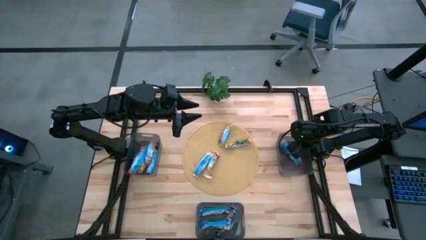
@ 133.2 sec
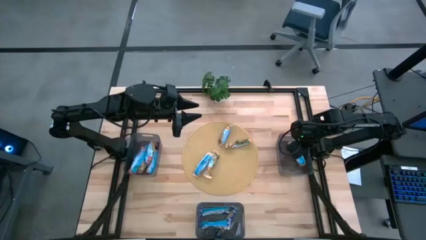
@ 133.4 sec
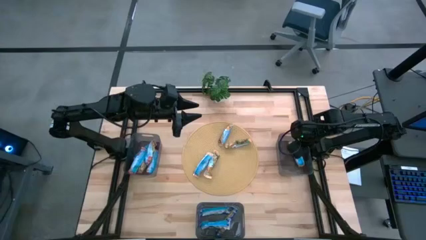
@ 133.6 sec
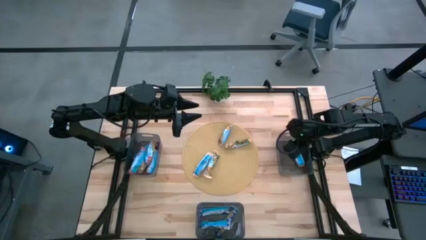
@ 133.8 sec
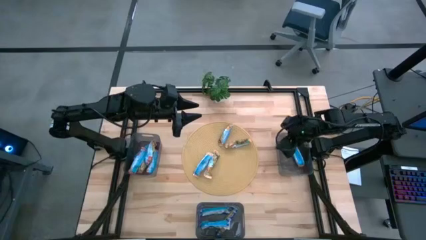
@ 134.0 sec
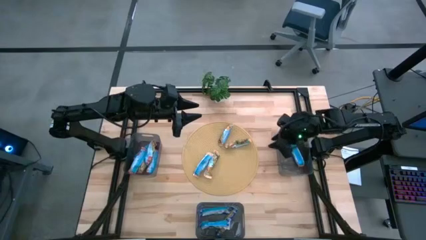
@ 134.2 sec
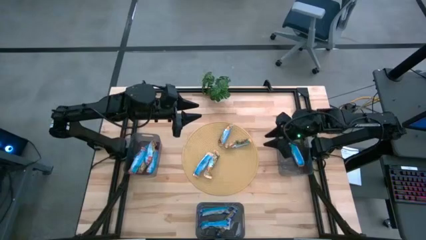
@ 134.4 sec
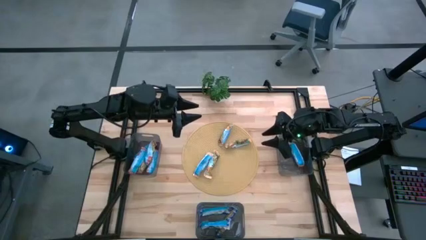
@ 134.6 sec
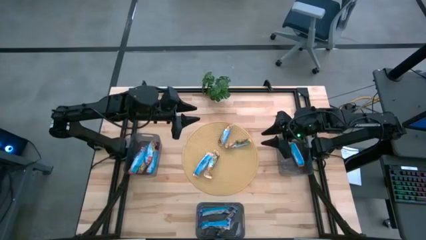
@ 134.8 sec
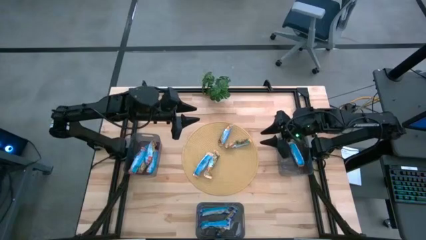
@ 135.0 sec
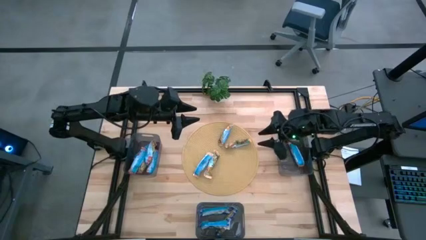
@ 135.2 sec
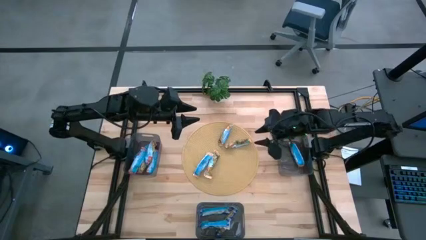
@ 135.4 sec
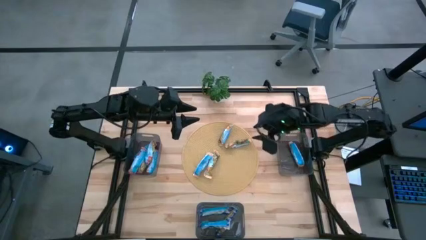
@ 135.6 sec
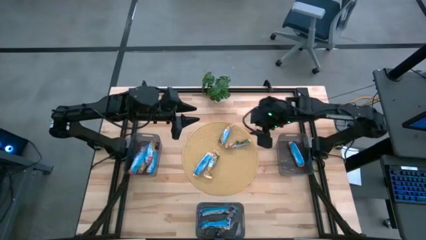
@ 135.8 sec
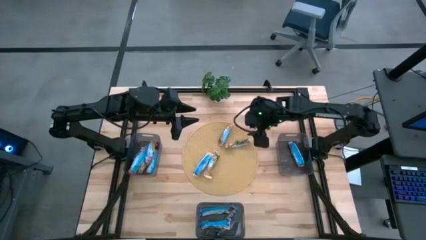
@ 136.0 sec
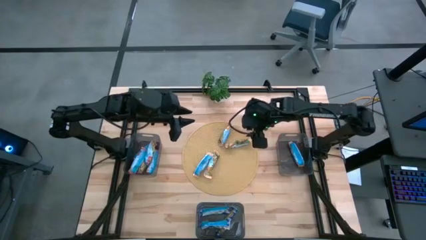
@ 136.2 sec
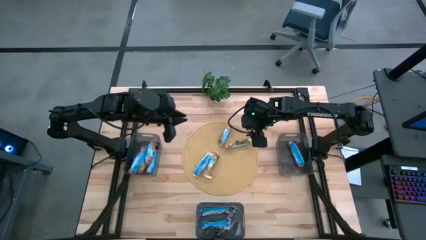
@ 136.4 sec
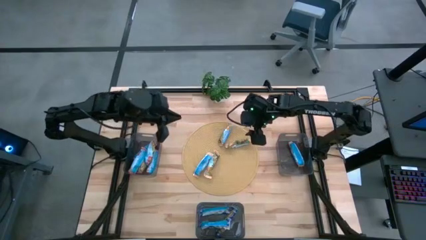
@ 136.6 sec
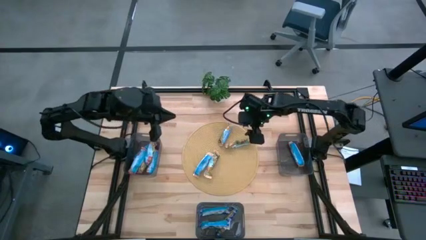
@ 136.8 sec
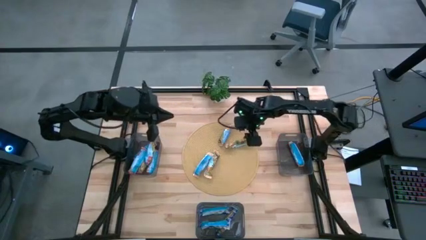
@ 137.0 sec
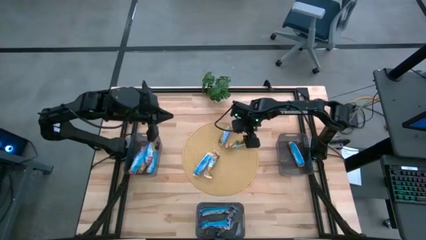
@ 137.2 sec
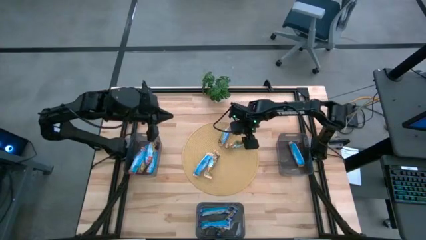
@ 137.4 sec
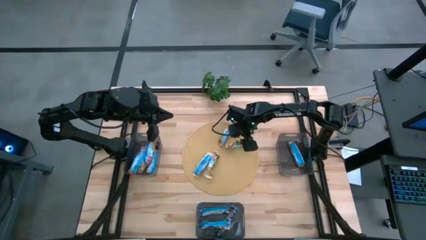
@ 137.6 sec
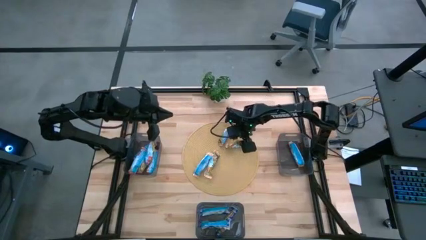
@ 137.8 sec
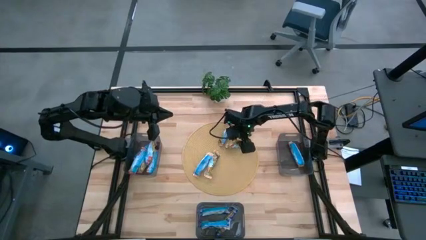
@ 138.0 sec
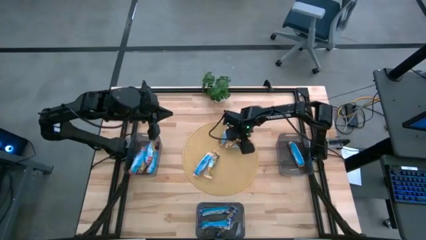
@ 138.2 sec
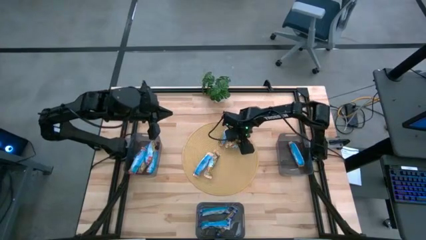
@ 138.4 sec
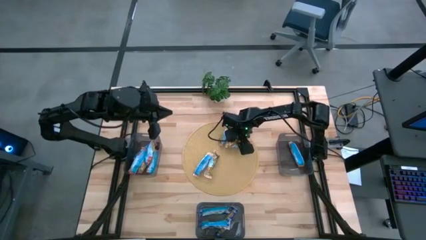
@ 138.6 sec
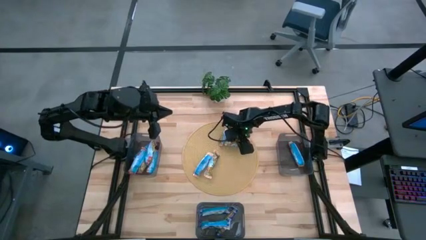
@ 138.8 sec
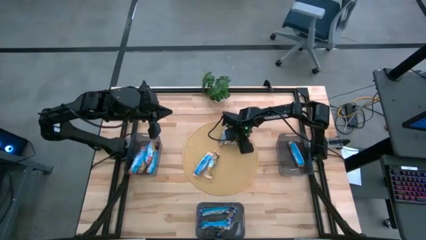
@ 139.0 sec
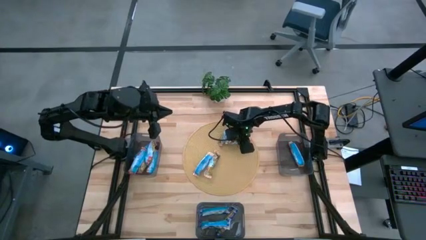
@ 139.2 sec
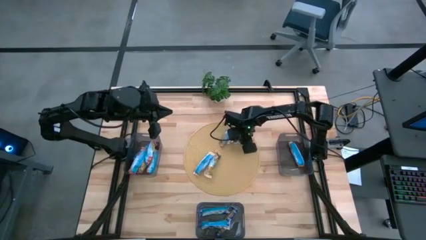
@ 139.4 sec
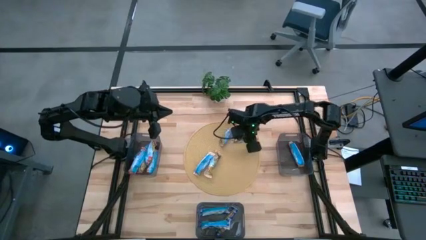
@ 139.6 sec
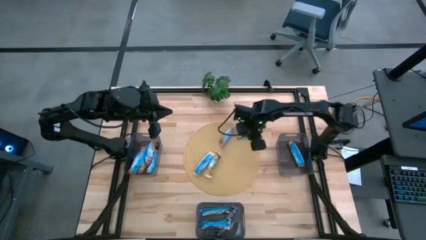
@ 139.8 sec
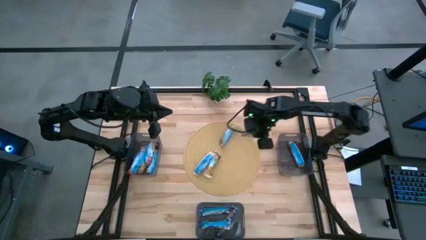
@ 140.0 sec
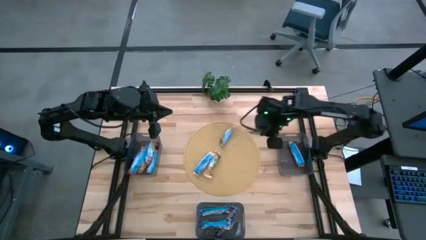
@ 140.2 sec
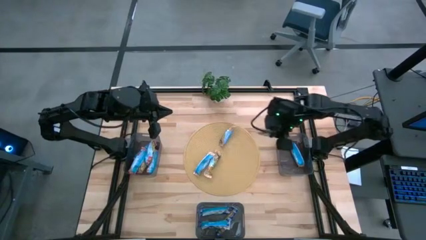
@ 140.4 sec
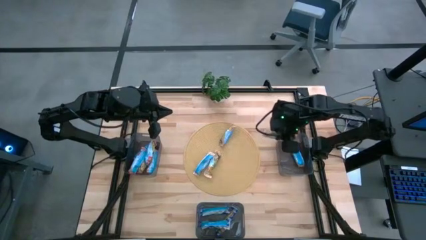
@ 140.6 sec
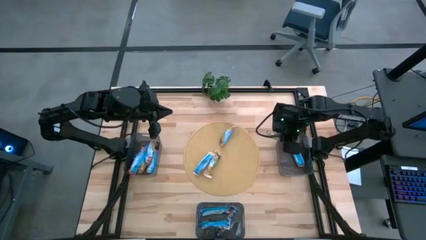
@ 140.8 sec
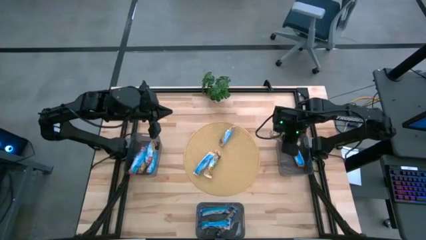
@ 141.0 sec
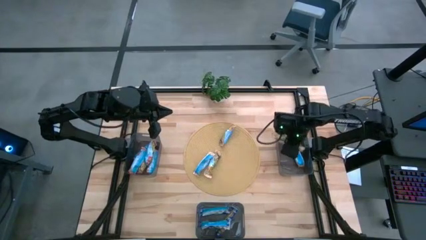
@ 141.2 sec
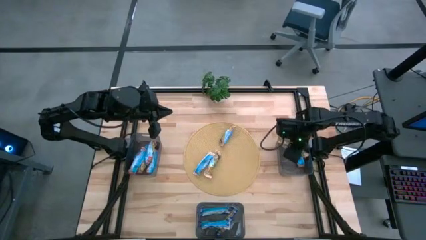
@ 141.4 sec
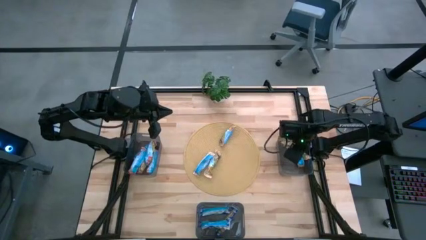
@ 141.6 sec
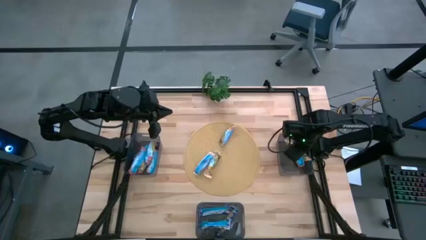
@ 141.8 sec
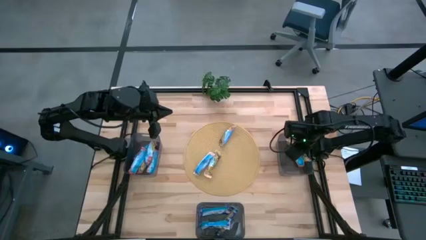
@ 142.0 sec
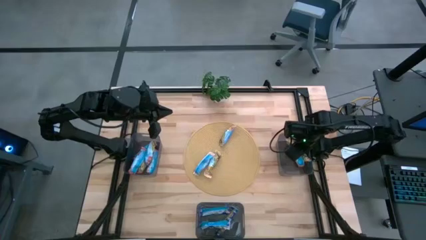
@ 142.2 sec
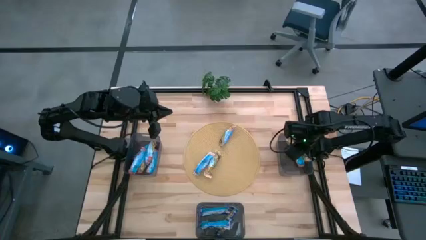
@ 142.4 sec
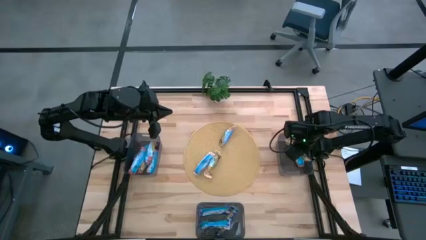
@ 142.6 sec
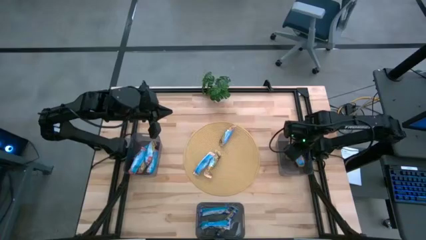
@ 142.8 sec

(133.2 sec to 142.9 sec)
Task: Pick and place Granola Bars by type
Put the yellow granola bar into the top right bin

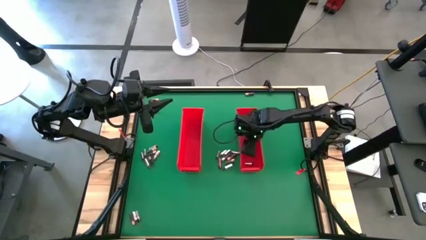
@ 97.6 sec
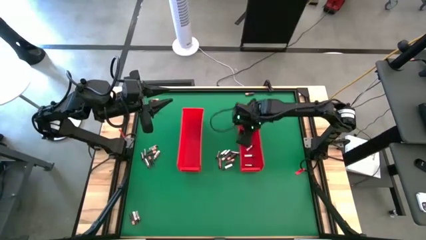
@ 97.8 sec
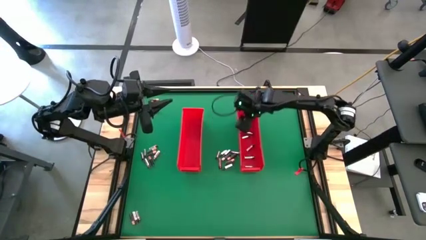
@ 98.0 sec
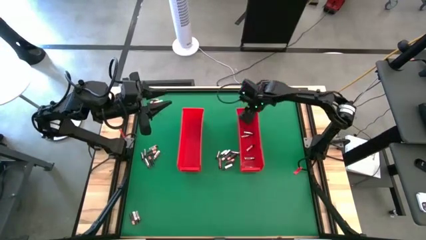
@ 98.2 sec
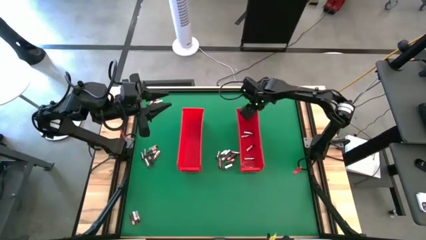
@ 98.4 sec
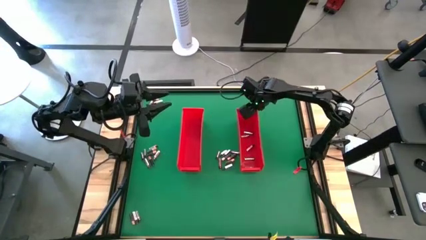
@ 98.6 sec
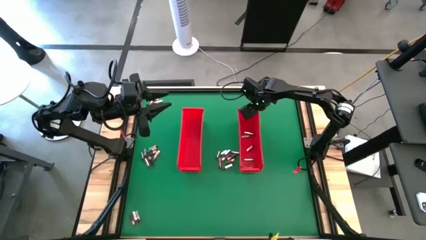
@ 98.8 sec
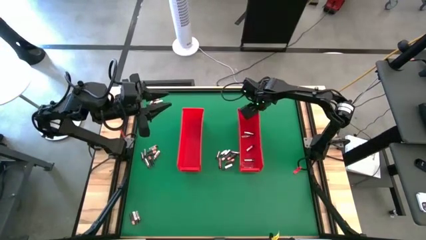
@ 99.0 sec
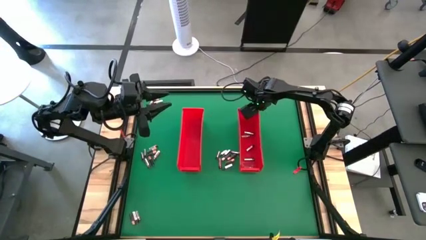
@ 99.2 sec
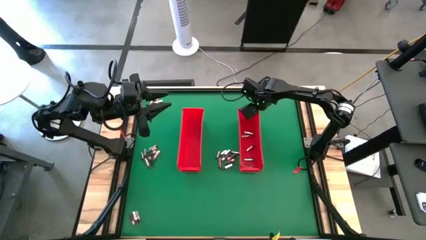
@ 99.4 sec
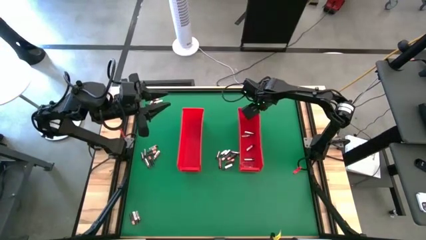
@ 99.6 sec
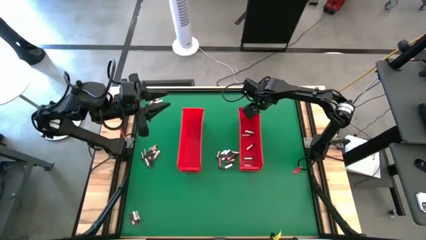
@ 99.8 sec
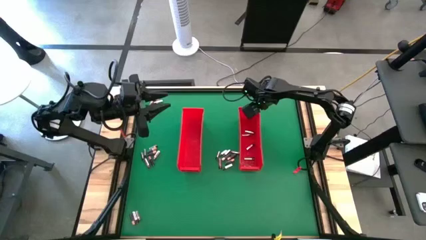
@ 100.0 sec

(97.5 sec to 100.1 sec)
Task: Sort batteries
Adjust the right red bin
